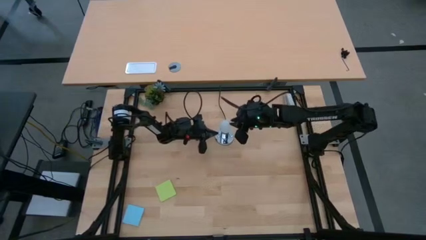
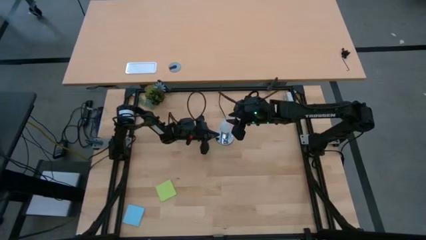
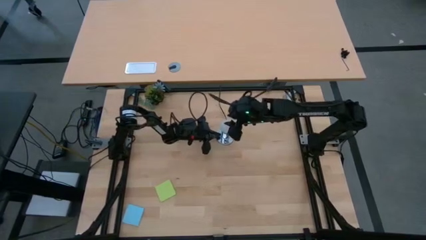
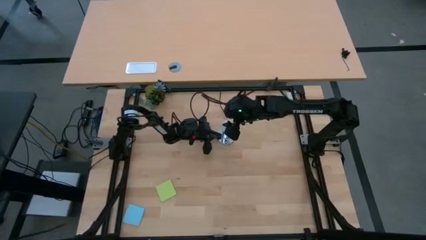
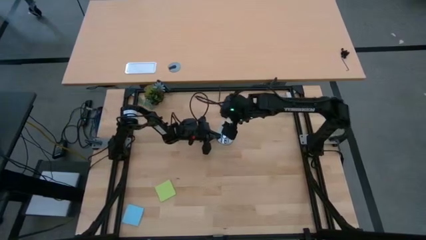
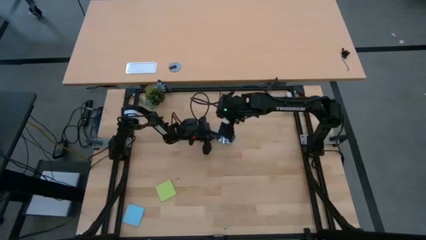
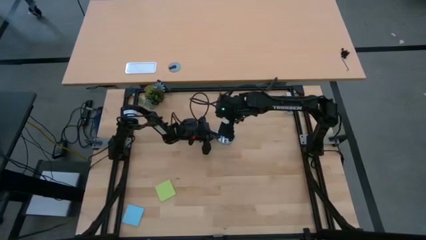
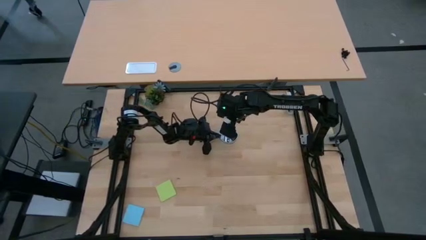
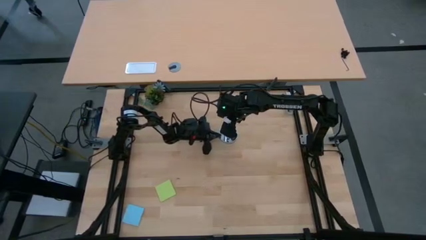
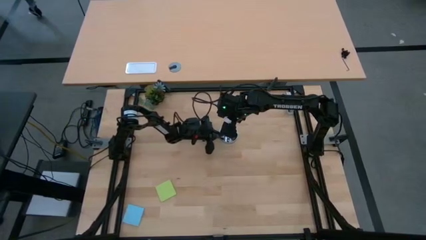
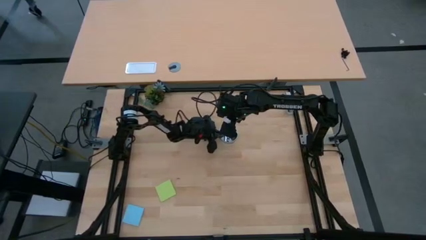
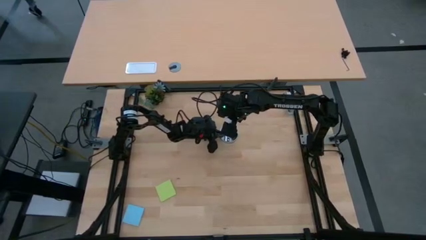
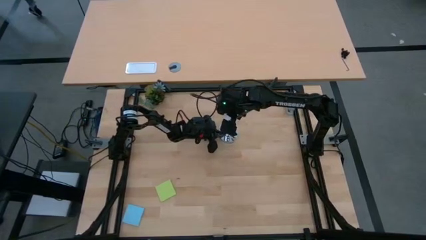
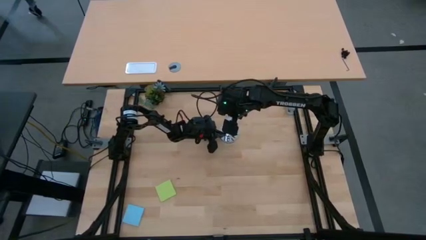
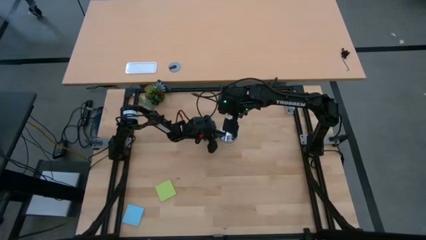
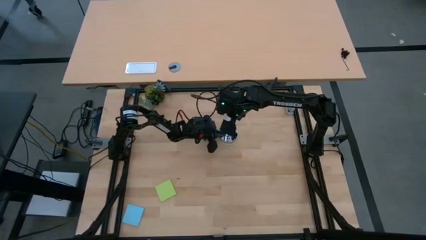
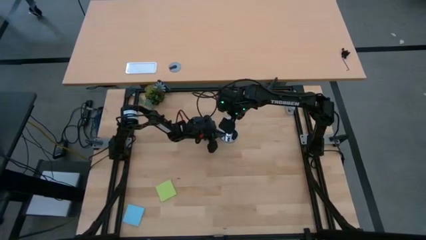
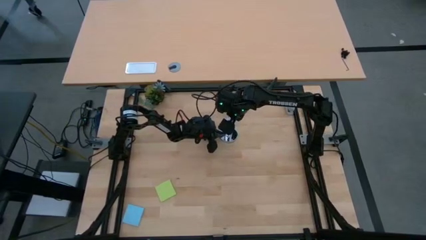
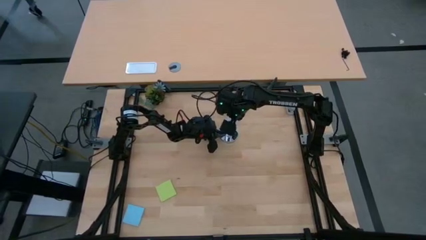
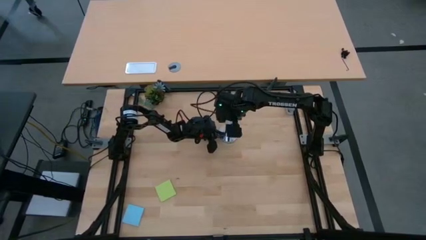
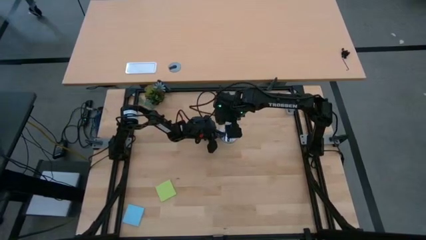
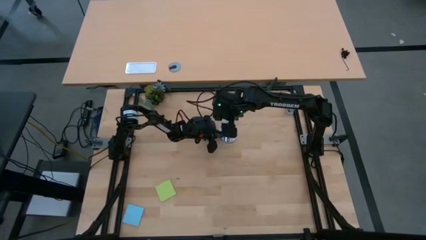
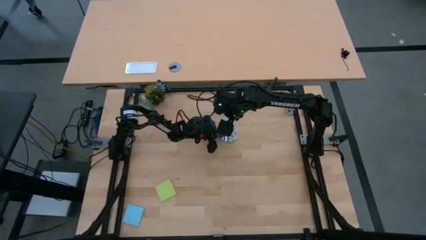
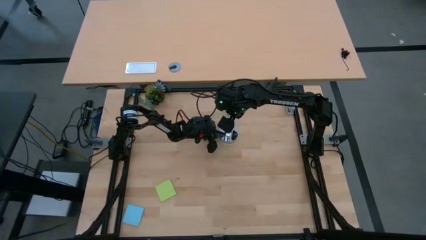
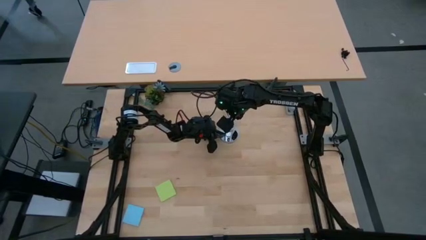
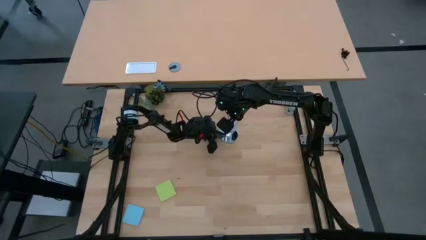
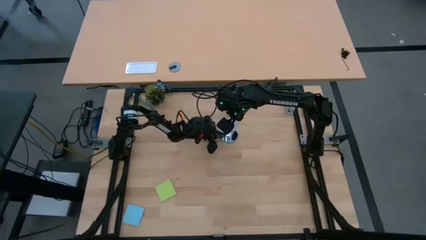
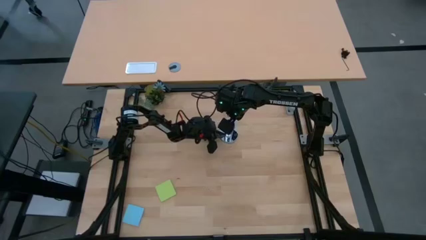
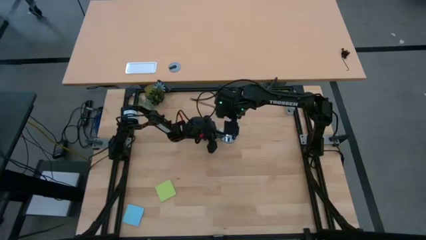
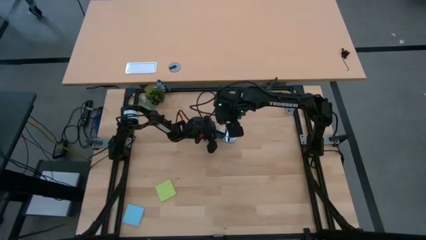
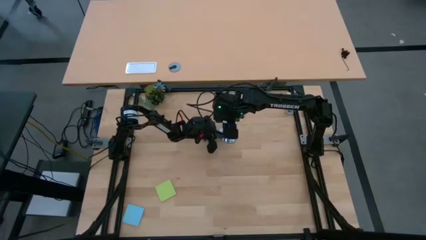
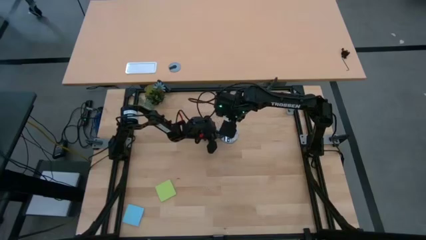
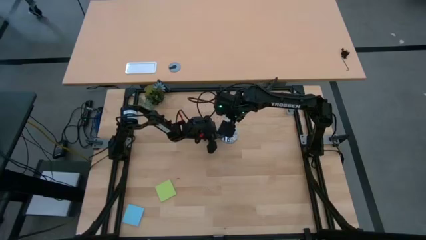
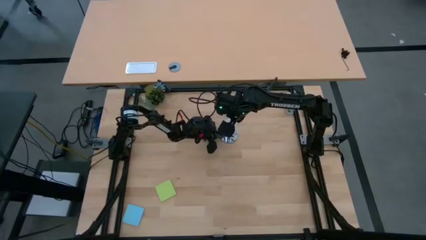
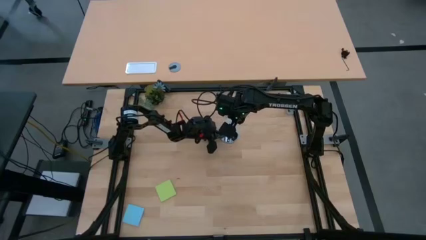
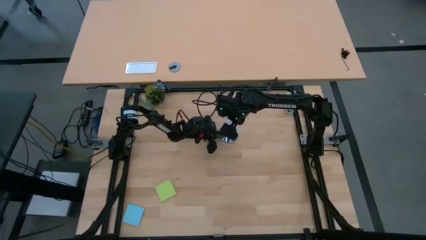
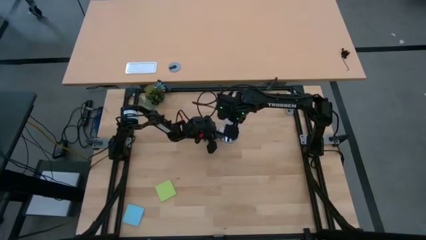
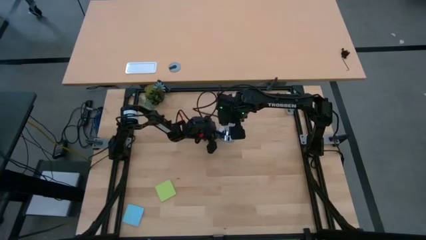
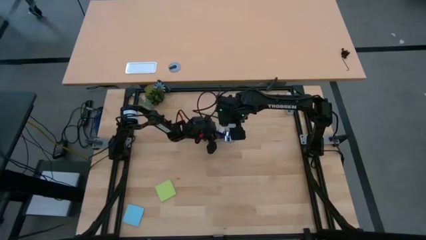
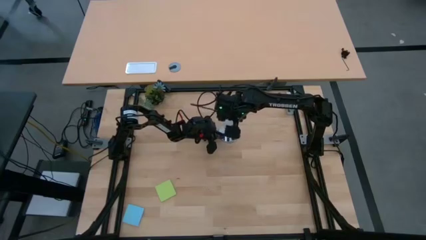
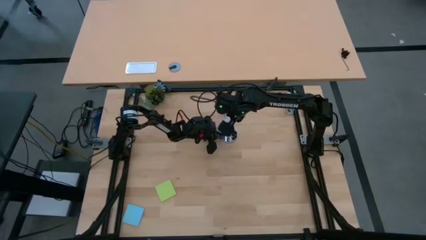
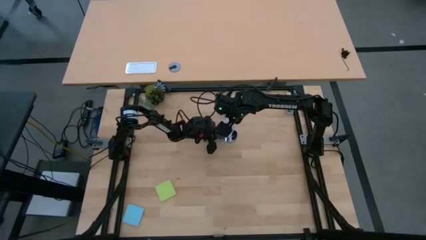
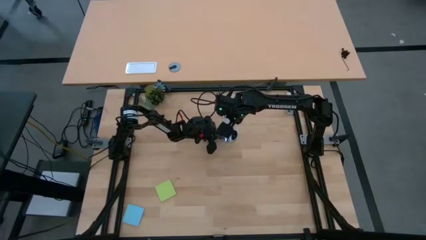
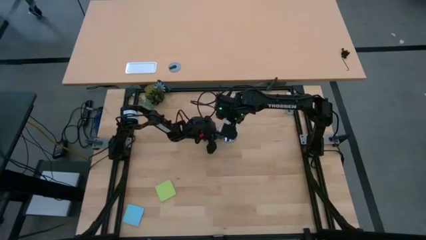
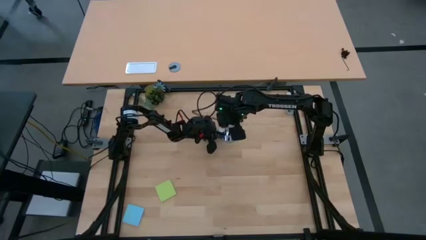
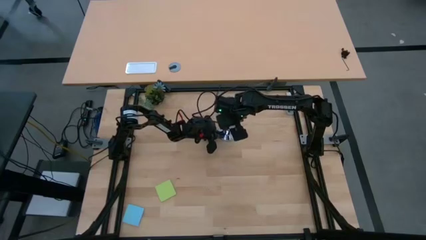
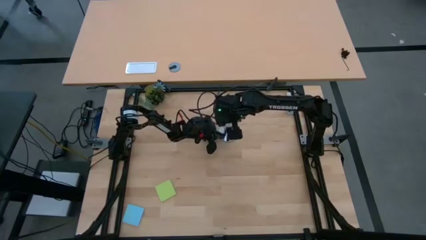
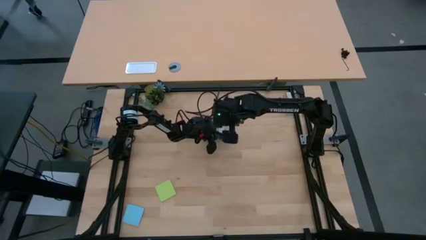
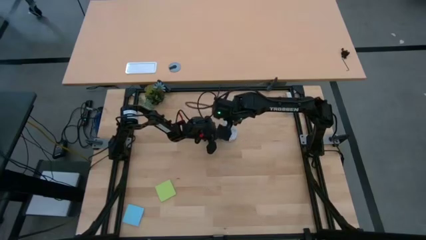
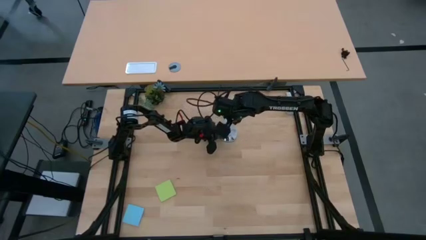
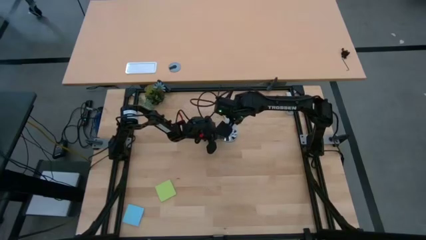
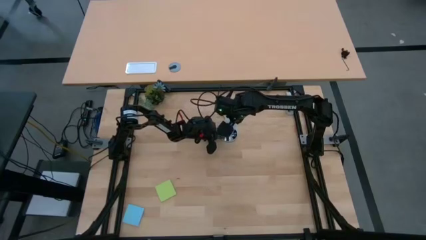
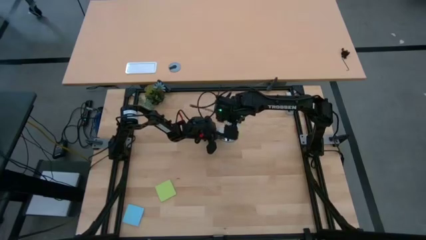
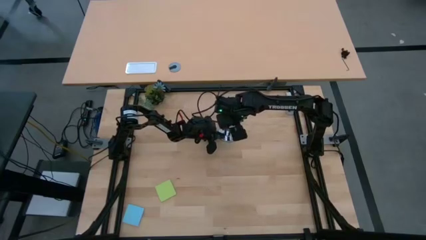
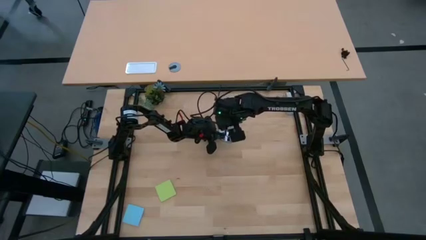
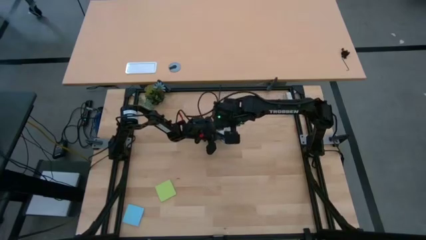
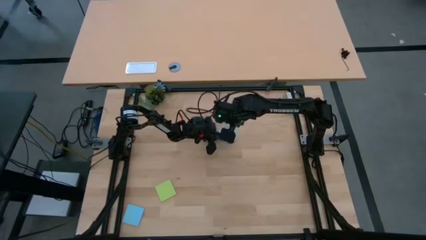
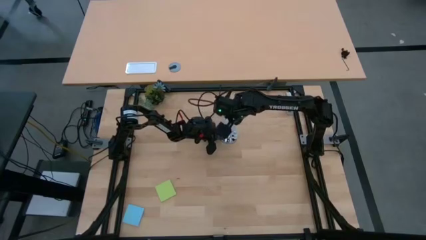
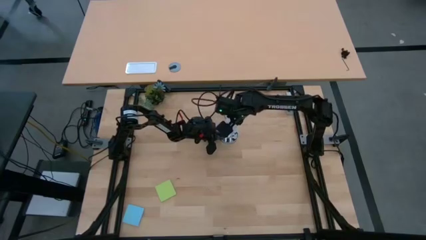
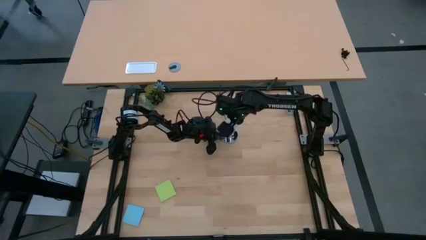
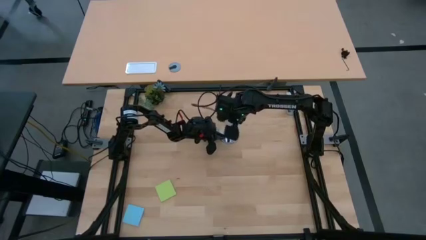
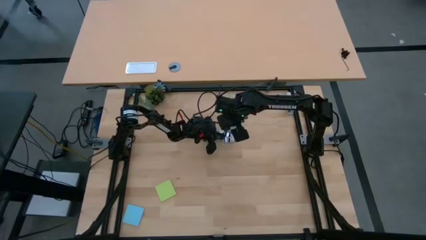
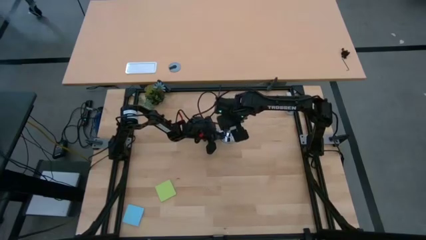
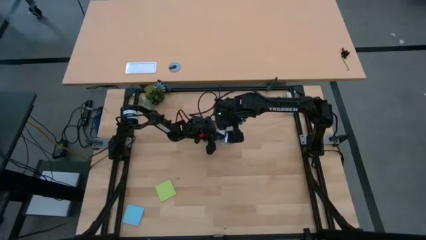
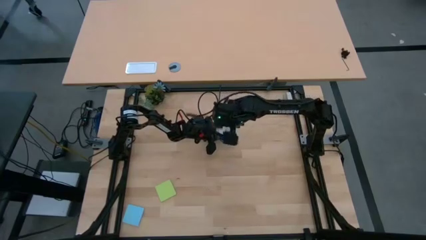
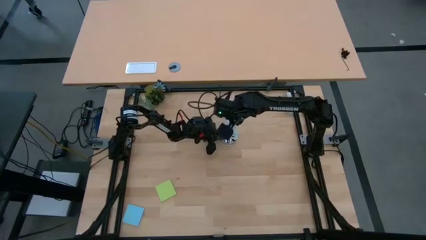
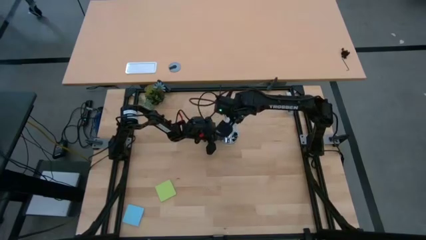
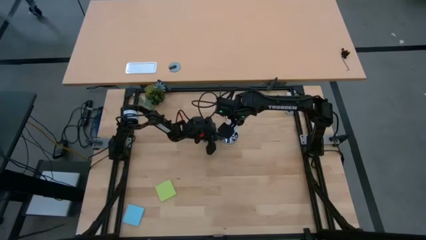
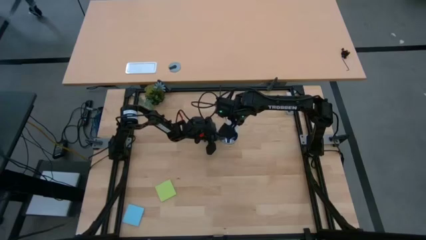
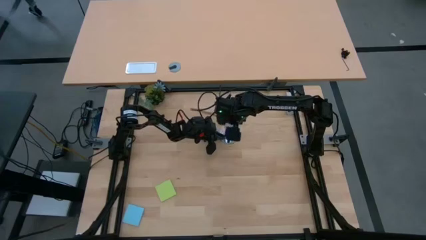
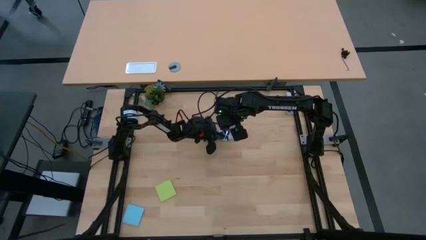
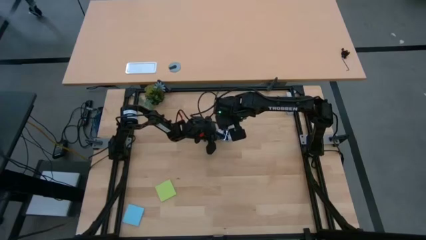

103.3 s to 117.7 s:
Task: Screw lightbulb
Remove the lightbulb from the lamp

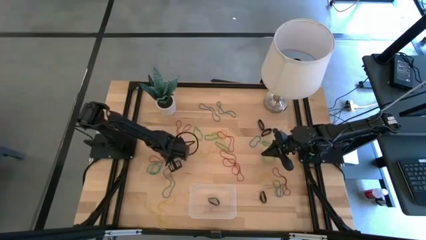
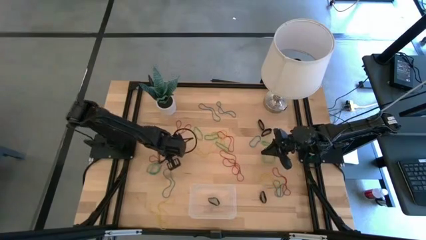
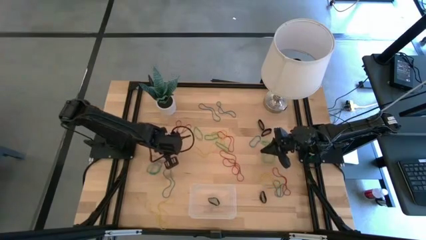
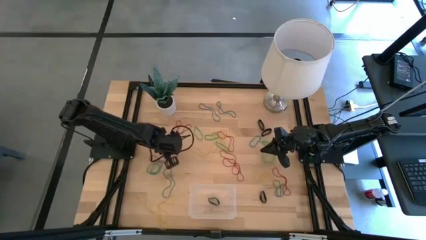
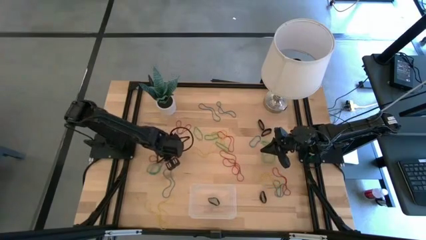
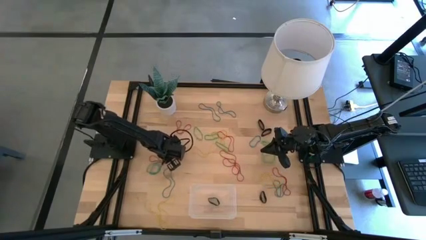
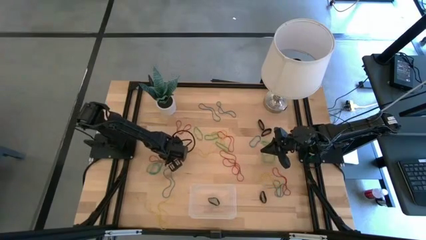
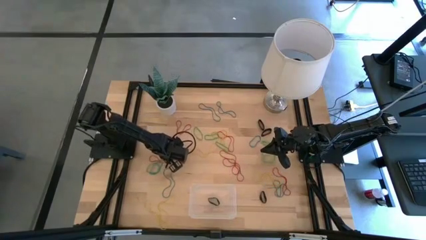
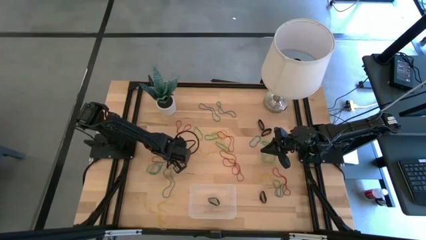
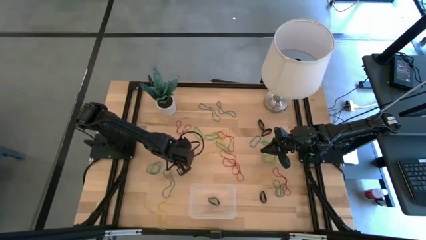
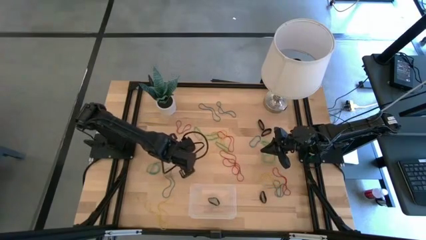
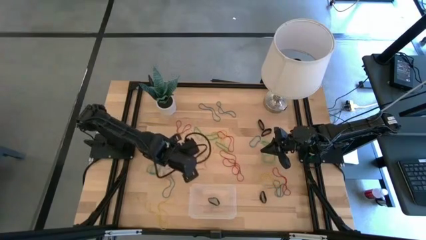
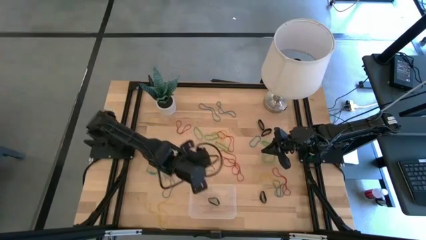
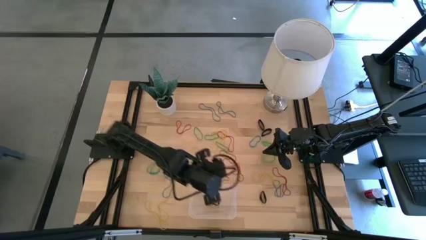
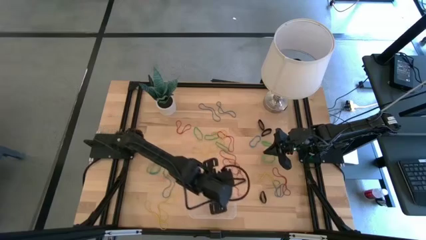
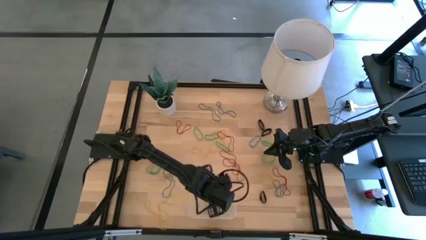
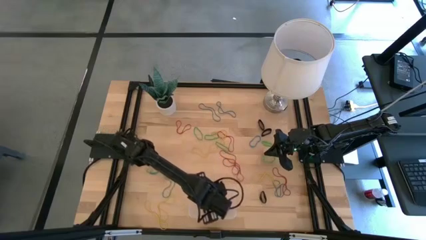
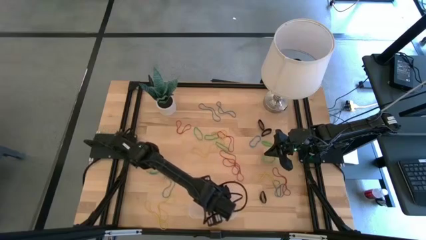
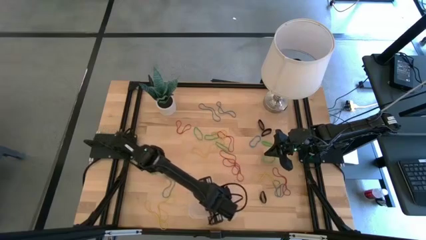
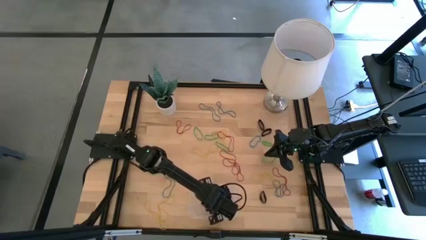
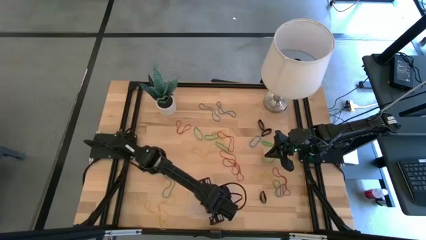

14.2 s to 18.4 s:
Task: Pick and place rubber bands into bin
Put the red rubber band into the transparent bin
